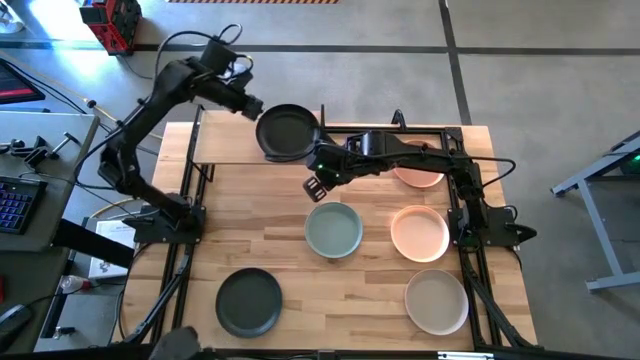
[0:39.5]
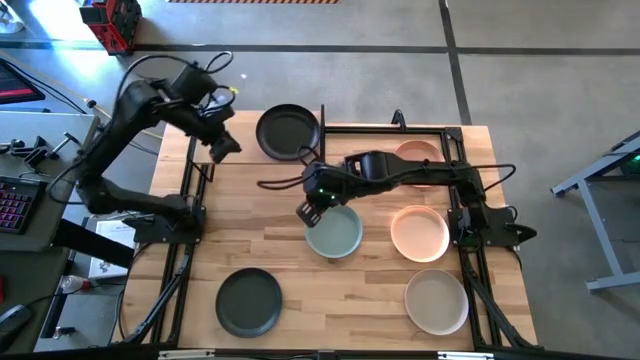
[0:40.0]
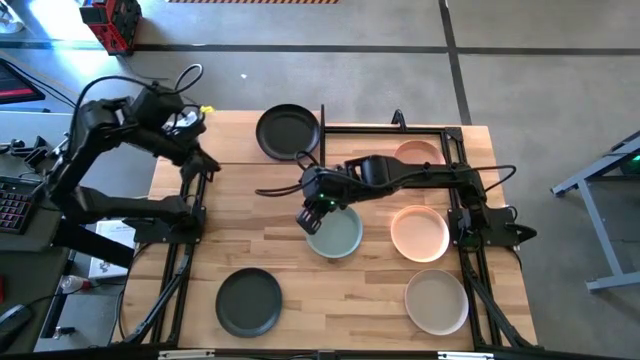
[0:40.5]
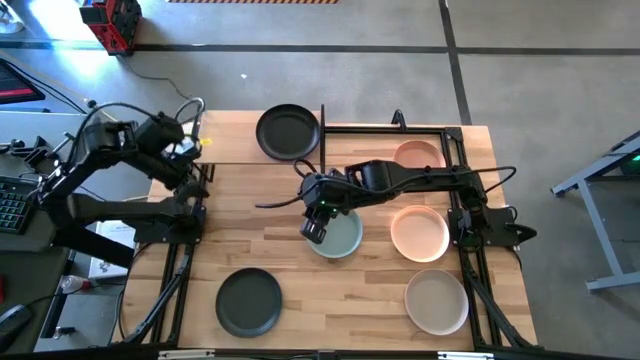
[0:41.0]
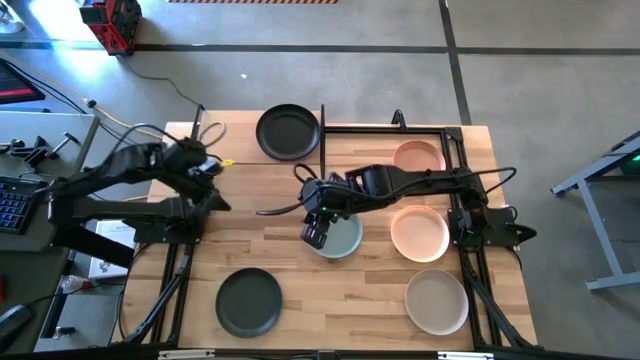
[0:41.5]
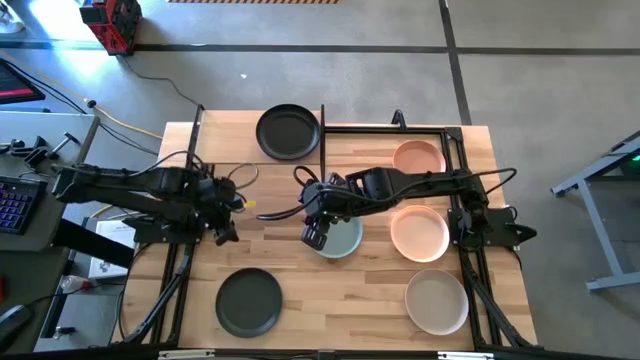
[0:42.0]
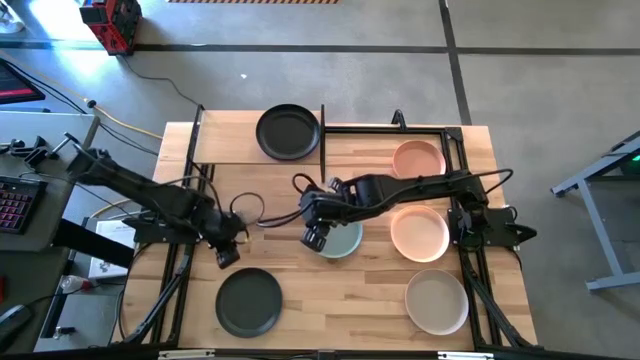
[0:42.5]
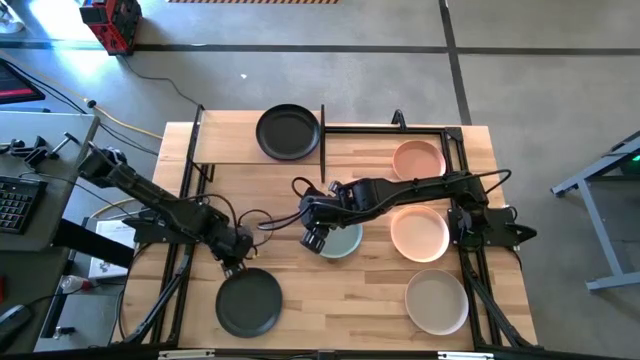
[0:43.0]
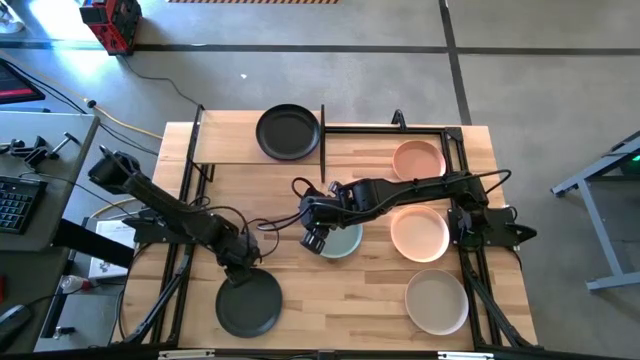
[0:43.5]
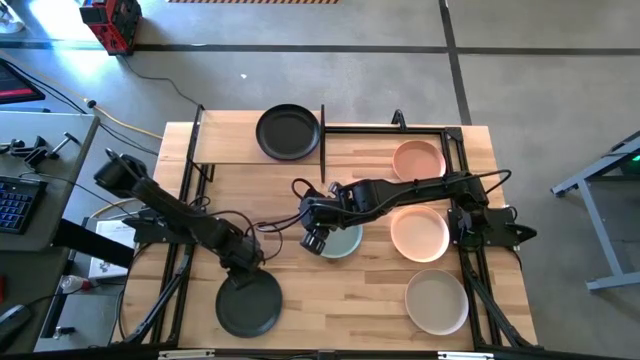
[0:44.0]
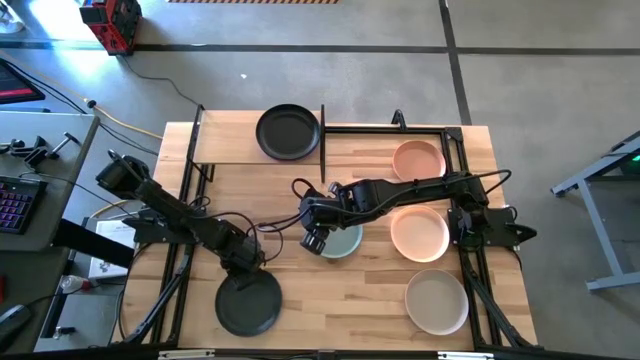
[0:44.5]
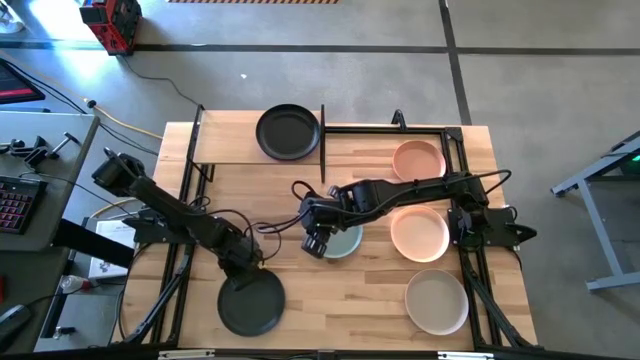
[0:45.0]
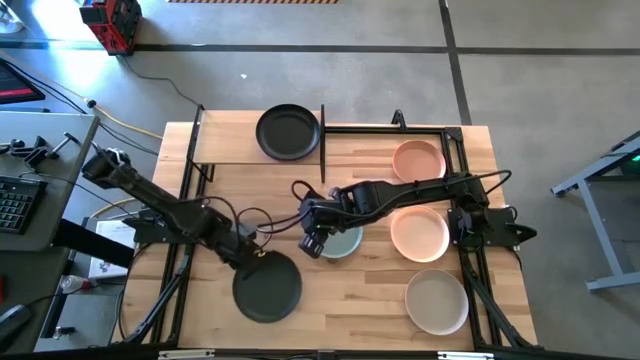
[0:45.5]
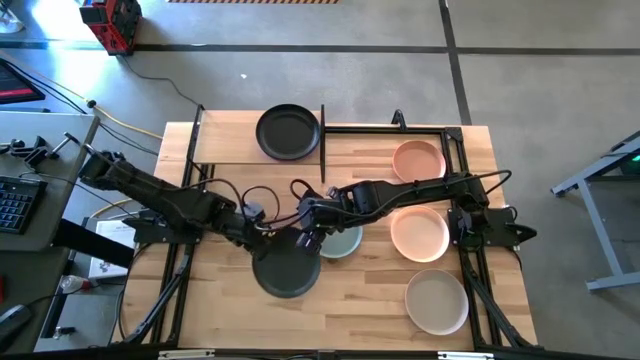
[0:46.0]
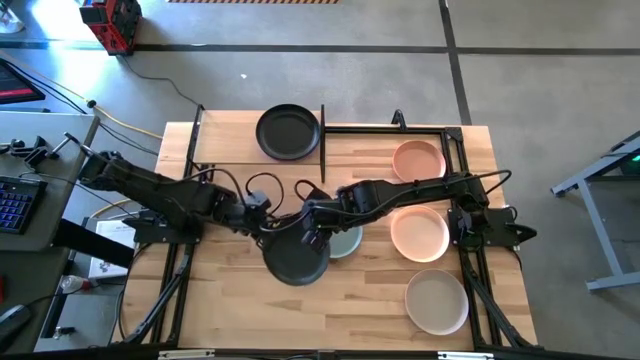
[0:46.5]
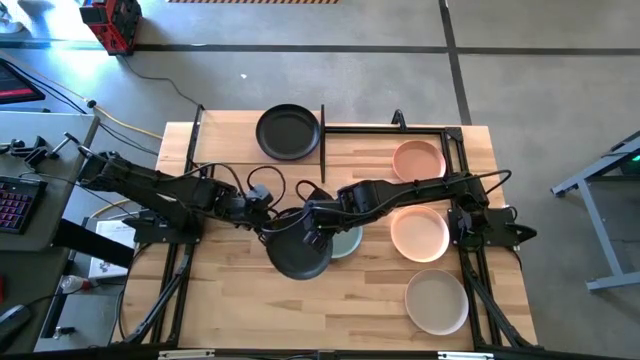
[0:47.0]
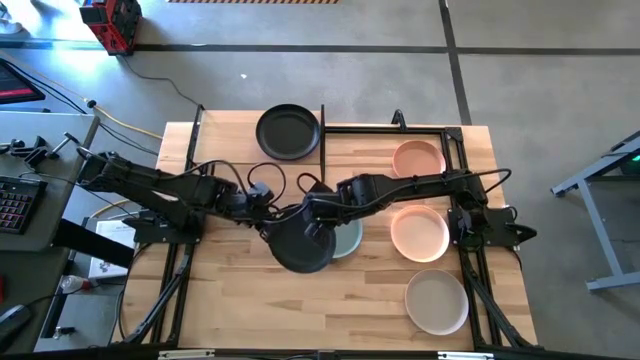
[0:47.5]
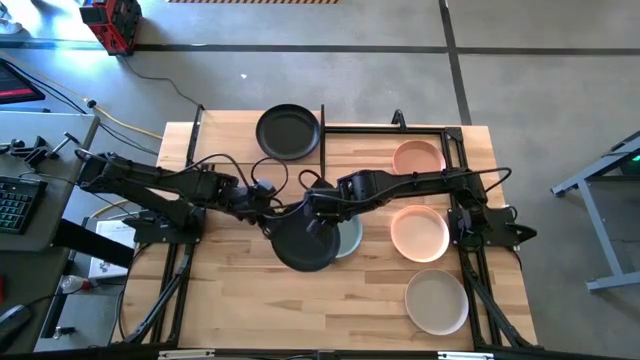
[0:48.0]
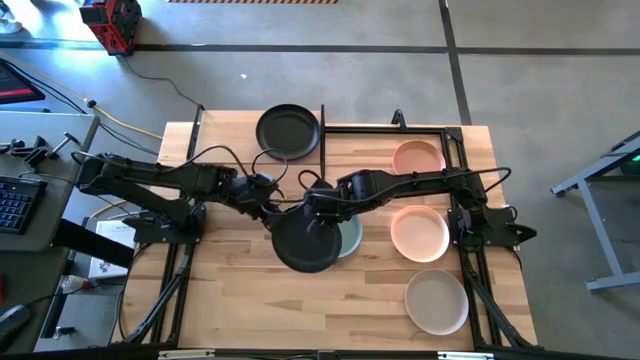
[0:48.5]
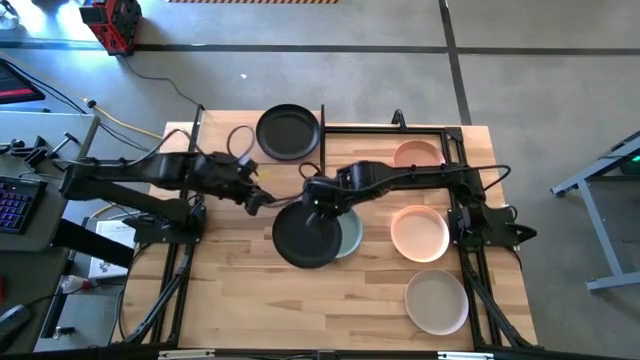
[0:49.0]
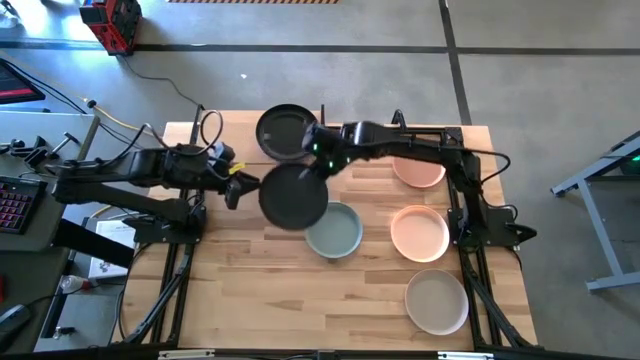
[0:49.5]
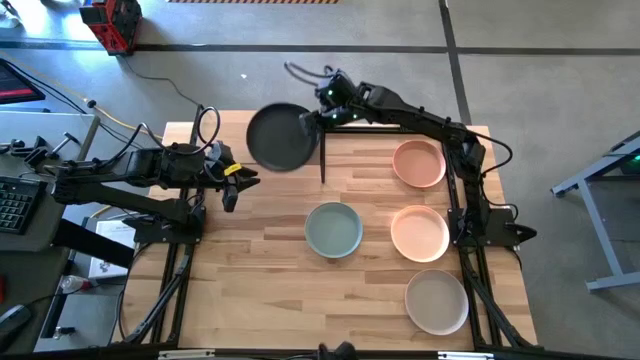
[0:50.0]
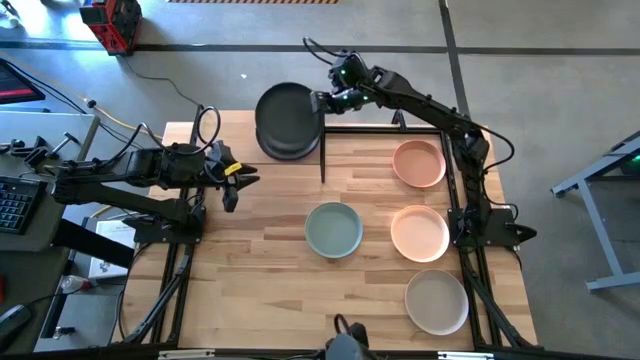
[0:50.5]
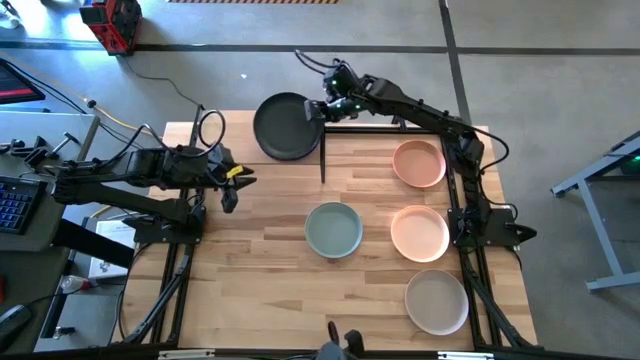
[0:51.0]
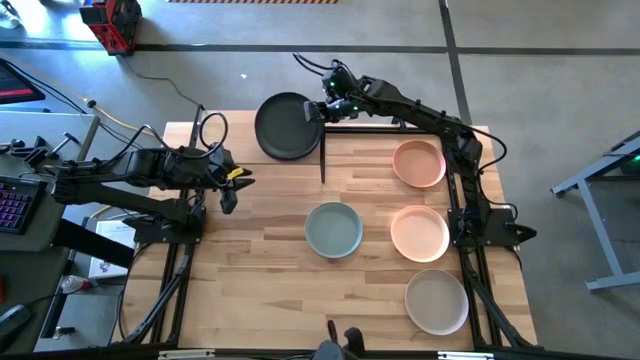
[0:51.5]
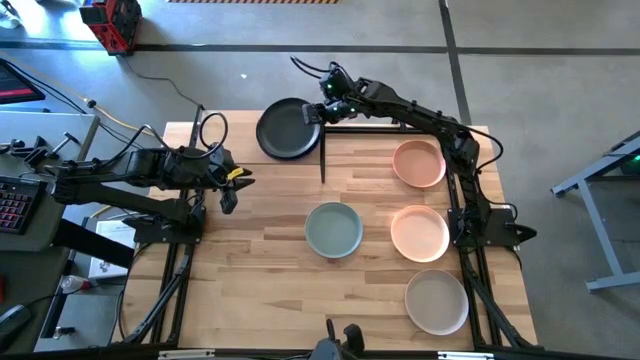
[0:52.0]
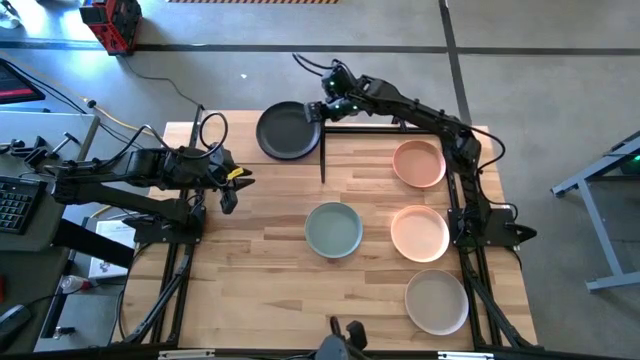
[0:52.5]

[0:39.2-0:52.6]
Task: Place and stack plates onto a shelf
Stack the black plate on top of the black plate on the shelf

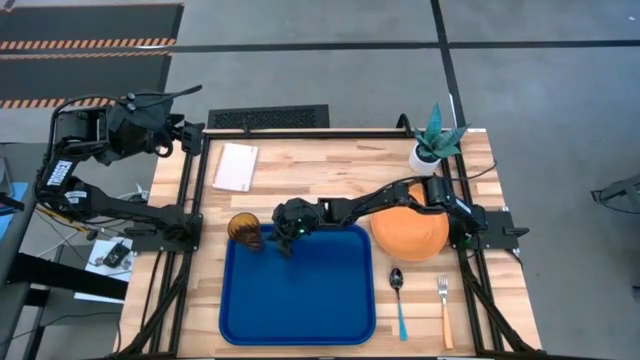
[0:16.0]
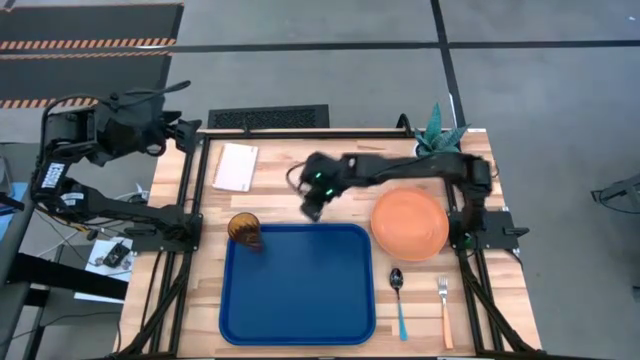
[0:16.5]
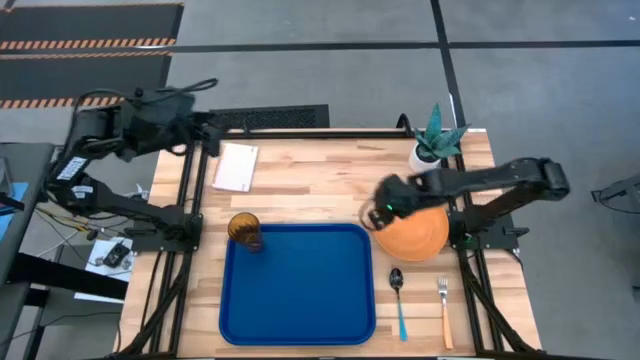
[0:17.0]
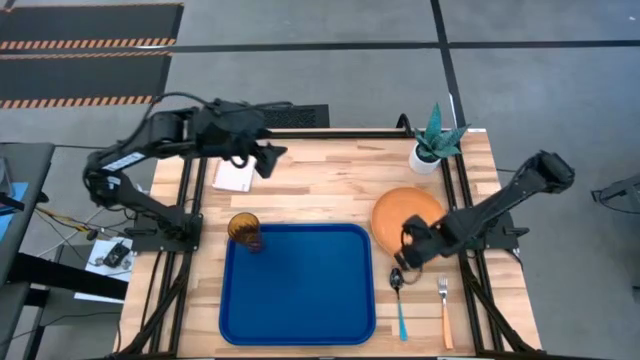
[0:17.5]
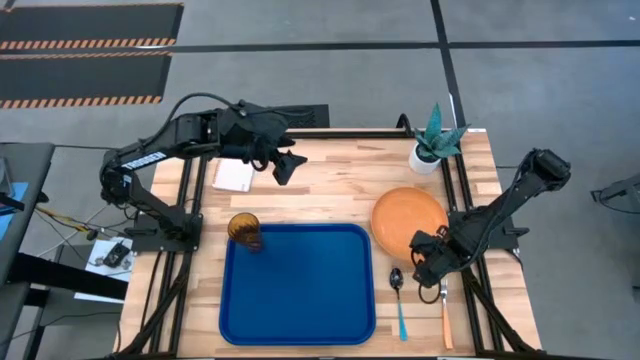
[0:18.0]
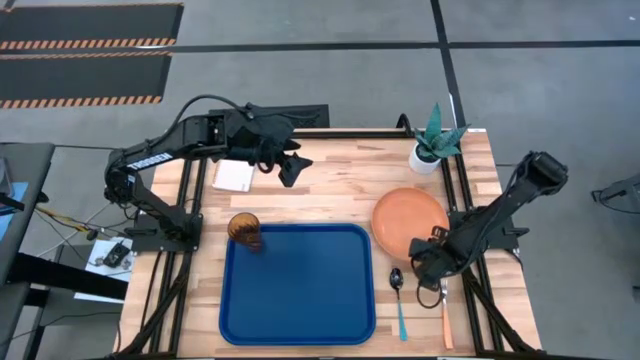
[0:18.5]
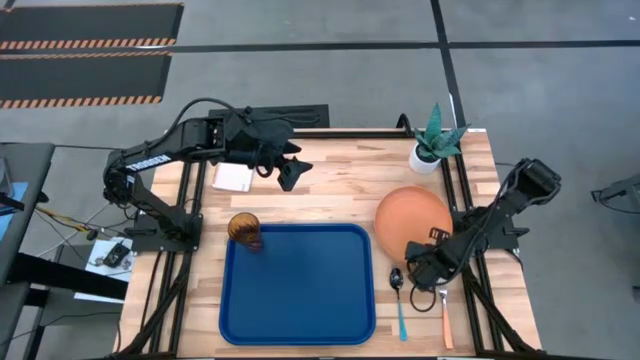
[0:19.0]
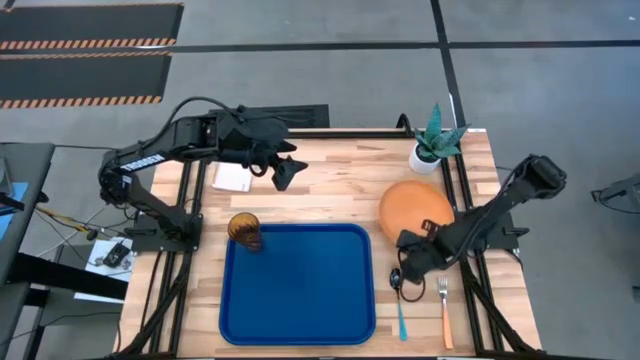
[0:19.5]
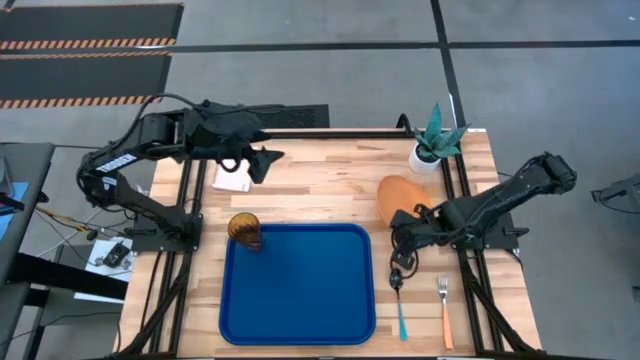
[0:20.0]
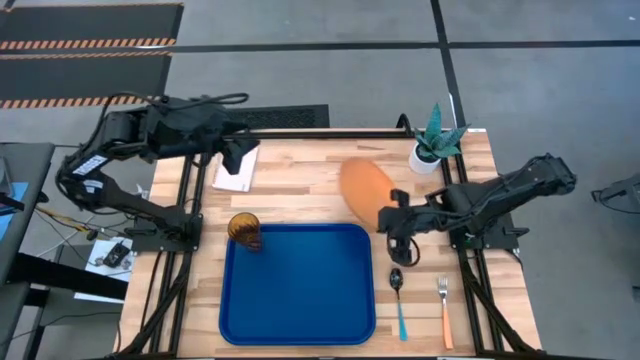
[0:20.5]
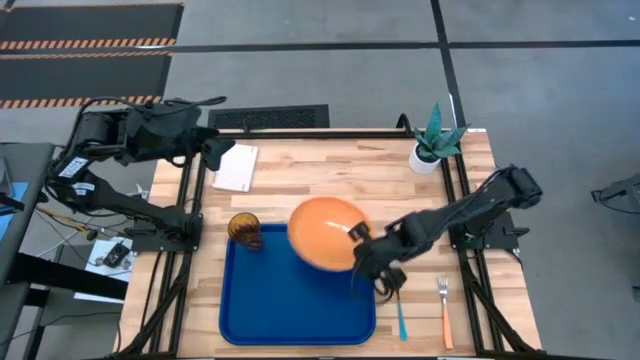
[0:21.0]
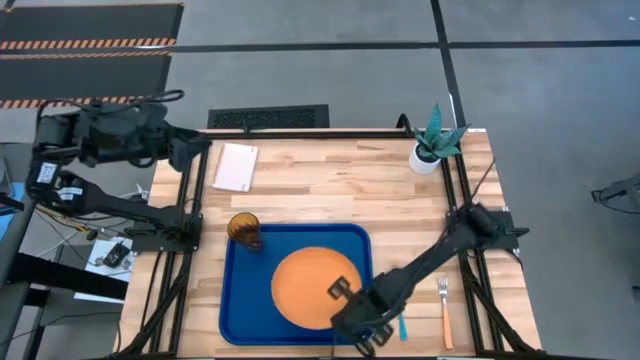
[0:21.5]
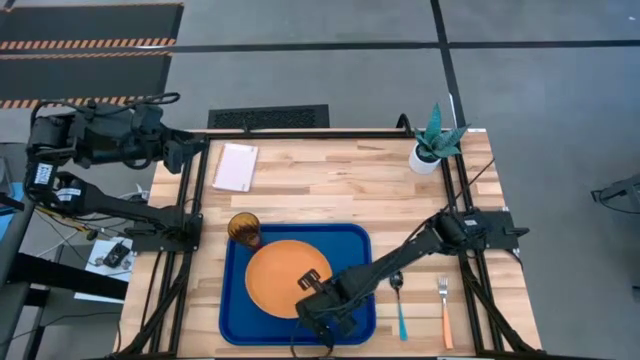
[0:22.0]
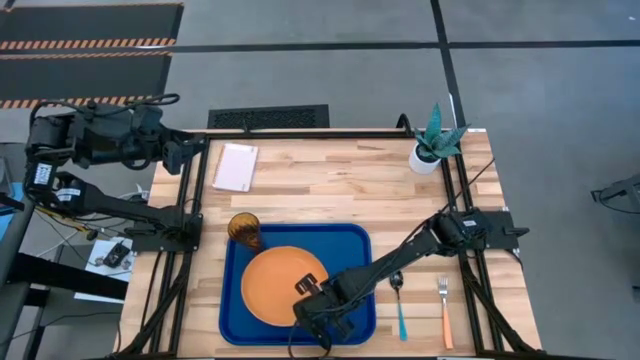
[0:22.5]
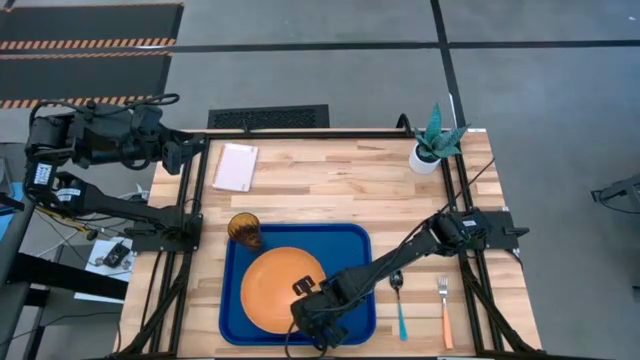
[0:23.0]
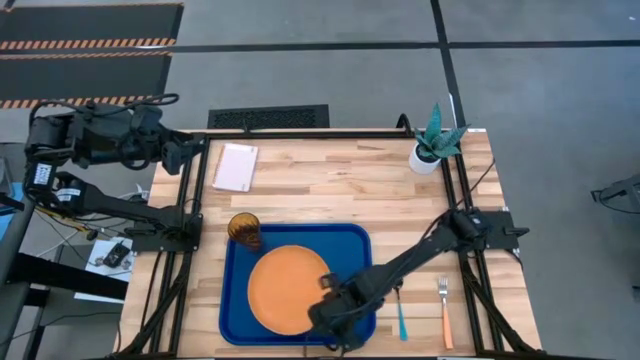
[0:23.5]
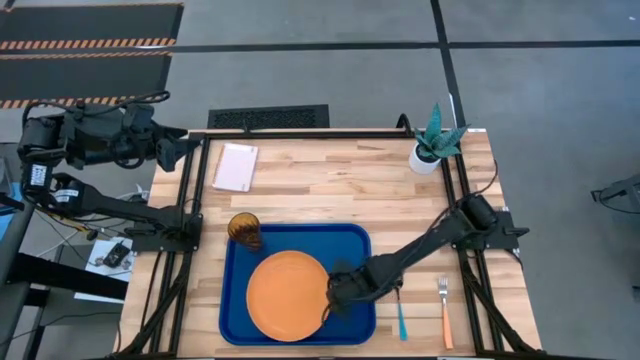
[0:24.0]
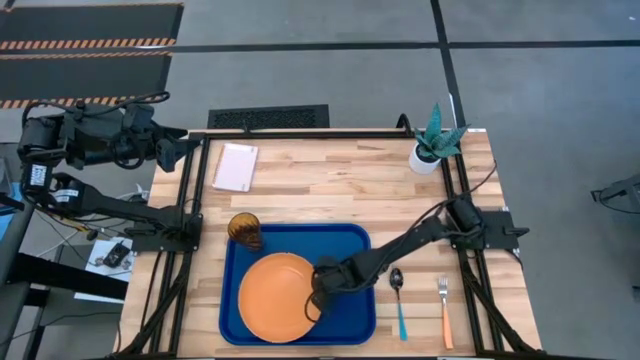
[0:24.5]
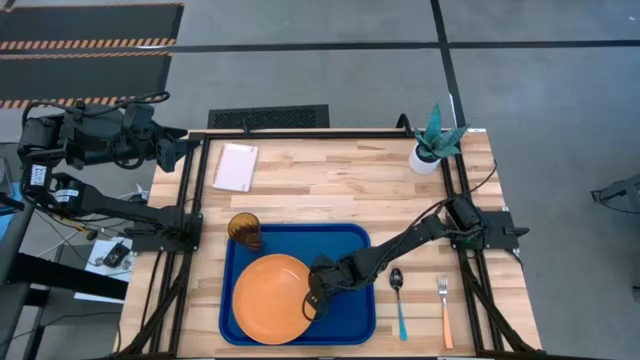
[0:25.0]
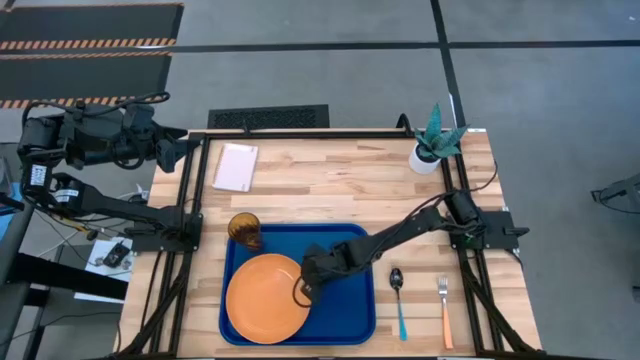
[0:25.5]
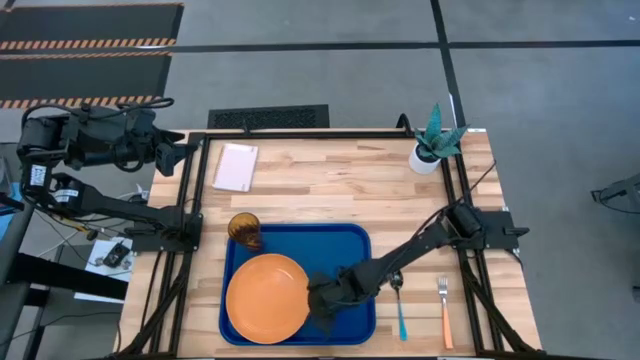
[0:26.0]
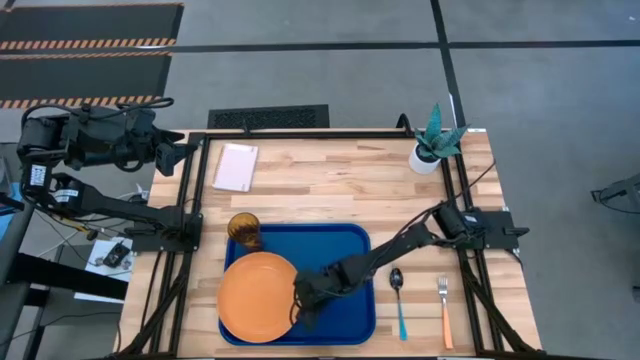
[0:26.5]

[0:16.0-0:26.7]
Task: Pick and place plate/cup/fork/spoon on tray
Put the orange plate on the blue tray at the bottom of the orange glass cup
